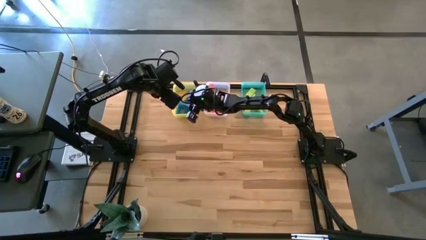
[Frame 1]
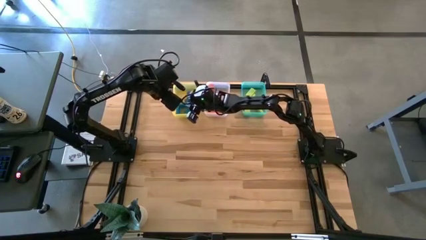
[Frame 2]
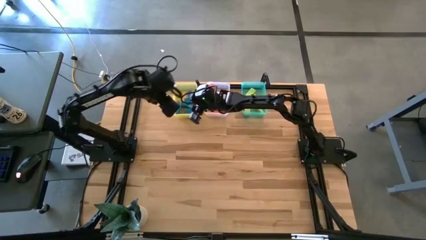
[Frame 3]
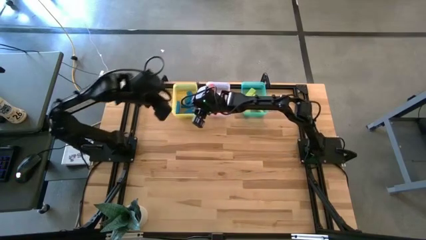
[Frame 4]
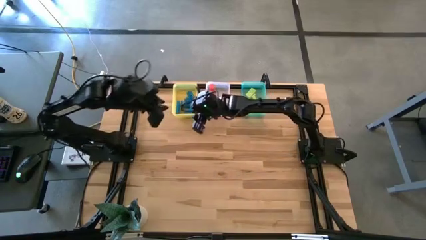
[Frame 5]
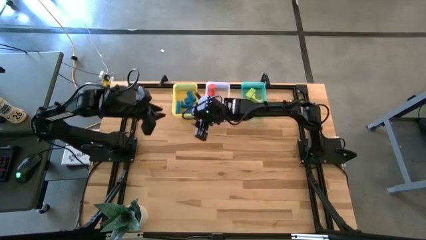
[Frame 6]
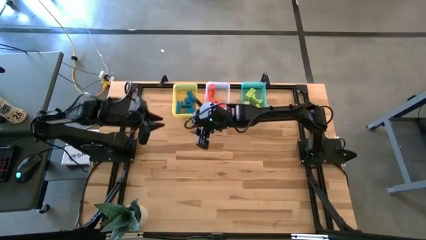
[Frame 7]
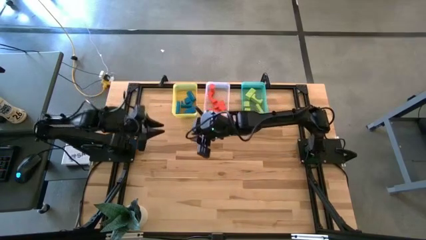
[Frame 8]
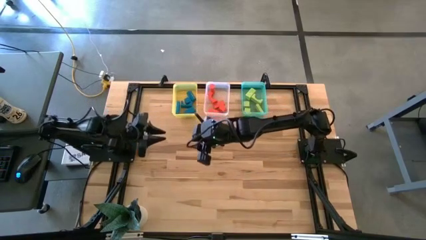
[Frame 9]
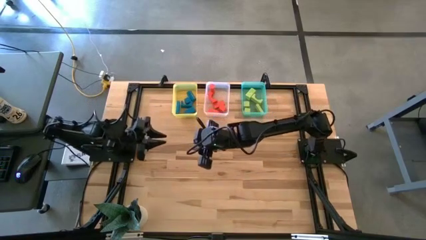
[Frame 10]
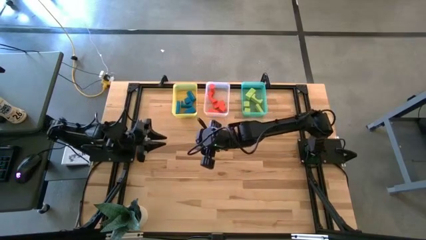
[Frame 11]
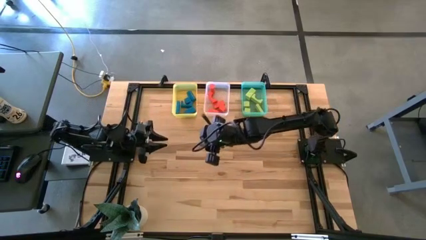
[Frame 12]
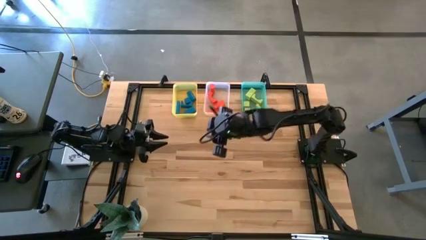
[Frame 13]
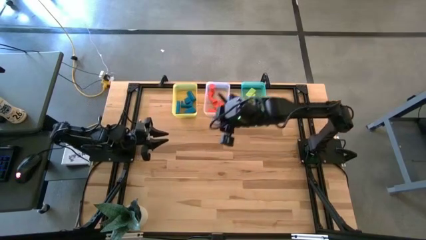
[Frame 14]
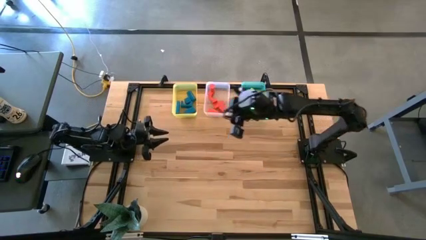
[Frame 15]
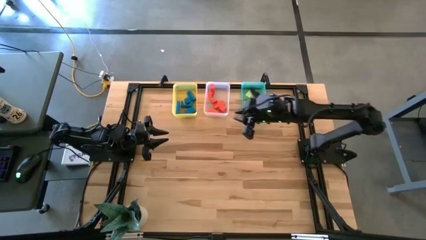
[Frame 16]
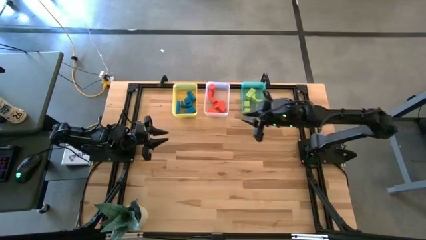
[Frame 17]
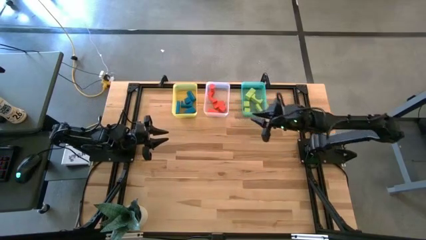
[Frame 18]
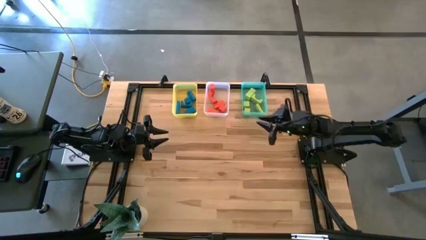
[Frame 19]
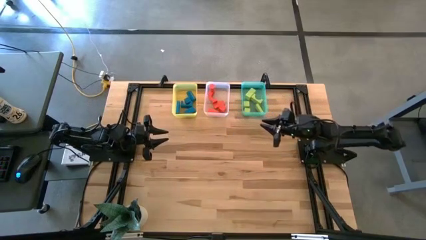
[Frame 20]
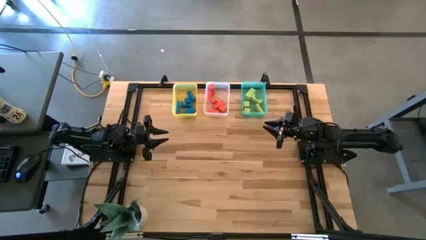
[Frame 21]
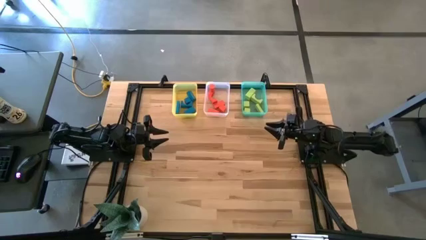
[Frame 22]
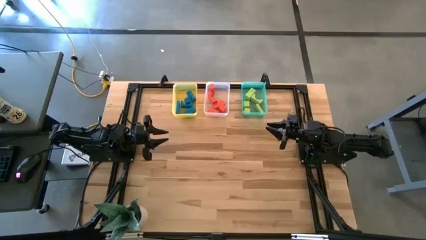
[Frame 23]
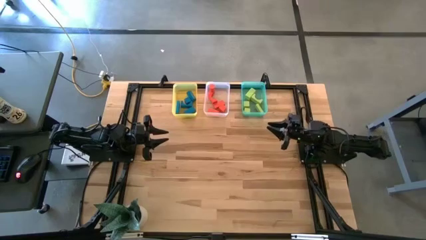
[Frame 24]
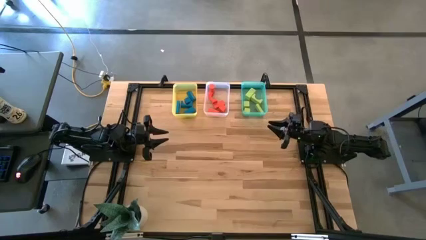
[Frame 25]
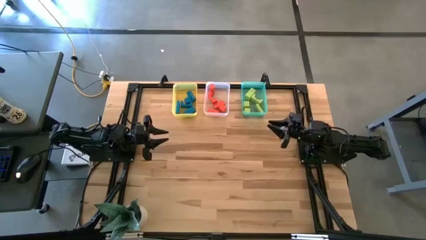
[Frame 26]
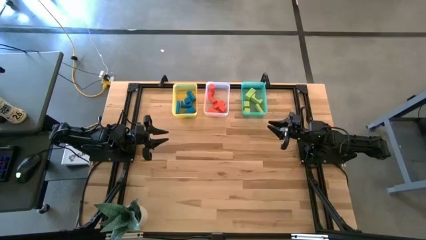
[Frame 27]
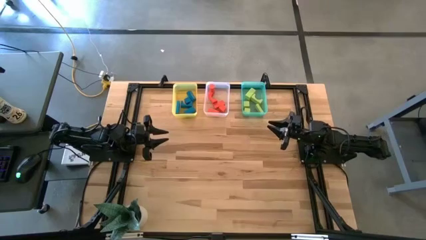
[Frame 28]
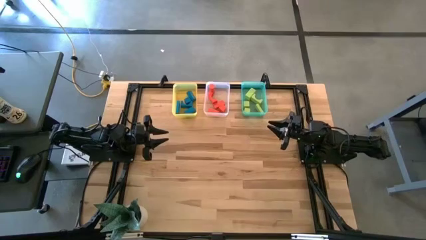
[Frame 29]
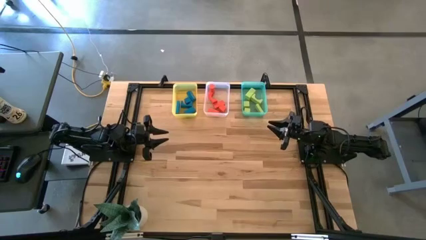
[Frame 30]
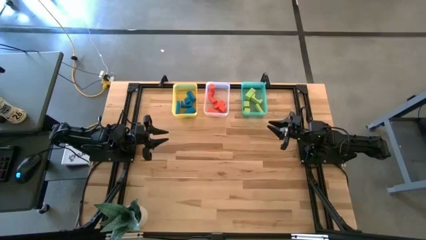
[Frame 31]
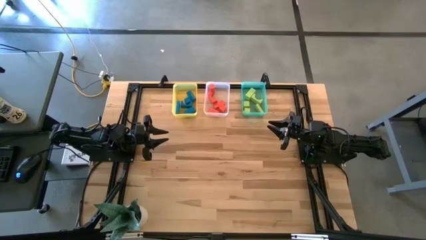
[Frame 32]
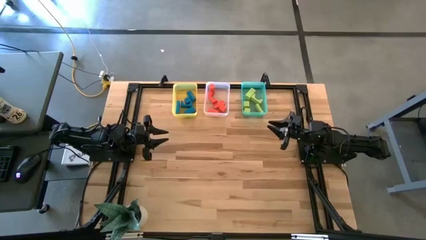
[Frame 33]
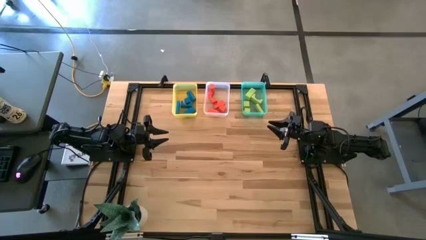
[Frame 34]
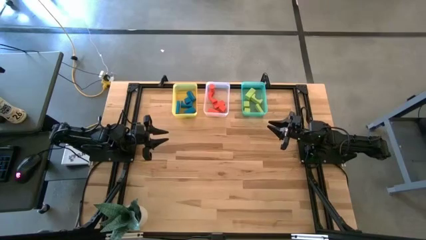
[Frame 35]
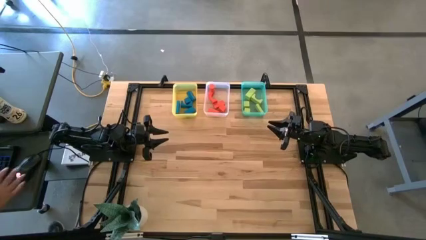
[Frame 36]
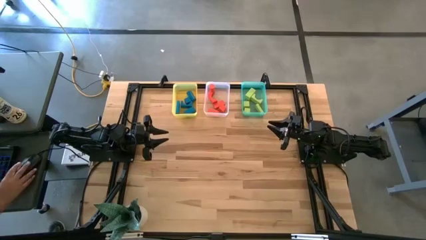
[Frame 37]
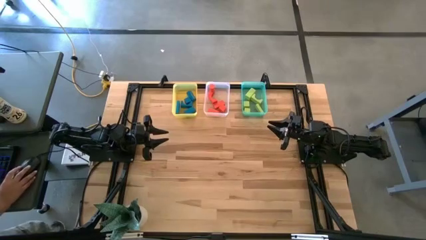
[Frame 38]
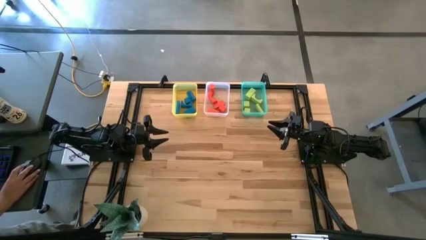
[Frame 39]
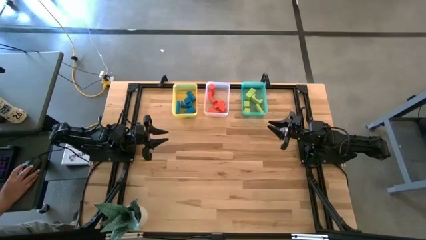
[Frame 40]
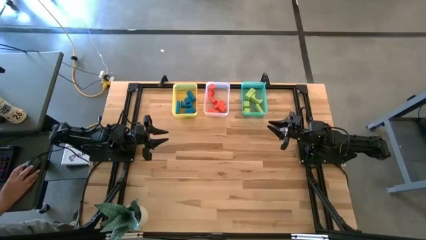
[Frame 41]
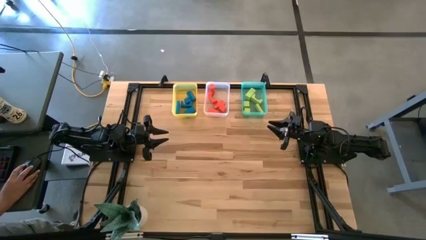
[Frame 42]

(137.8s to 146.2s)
Task: Sort & place blocks by color
Return to Home Position

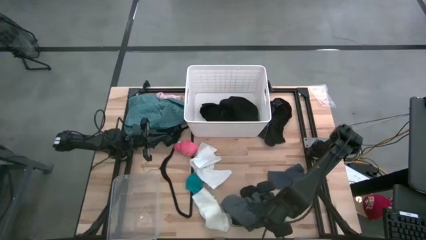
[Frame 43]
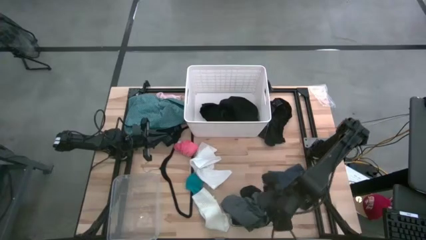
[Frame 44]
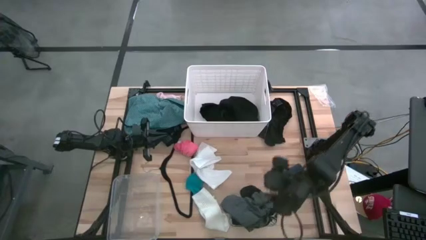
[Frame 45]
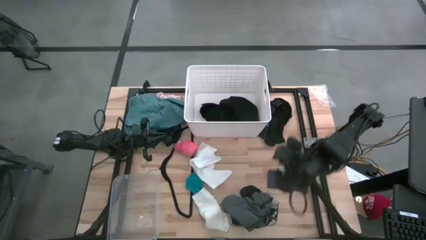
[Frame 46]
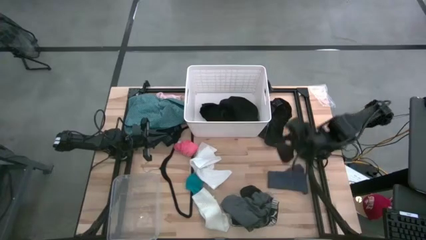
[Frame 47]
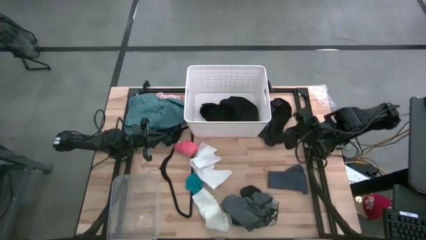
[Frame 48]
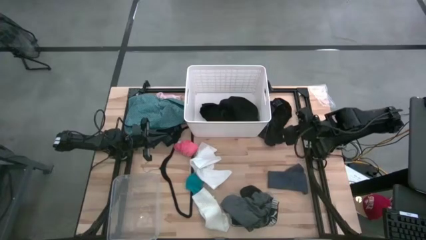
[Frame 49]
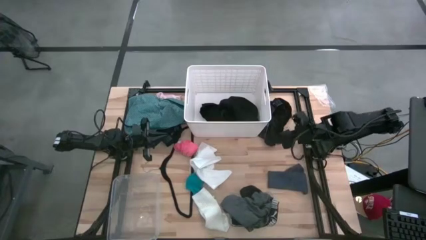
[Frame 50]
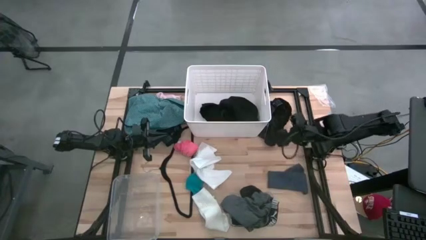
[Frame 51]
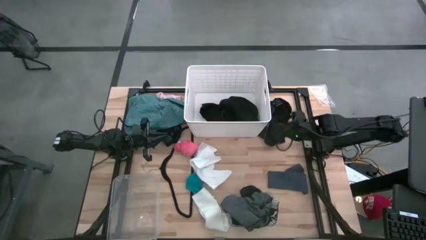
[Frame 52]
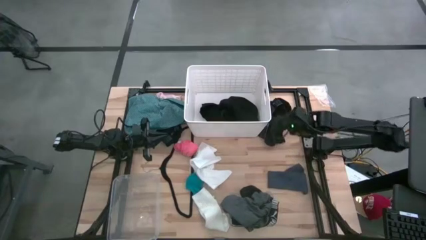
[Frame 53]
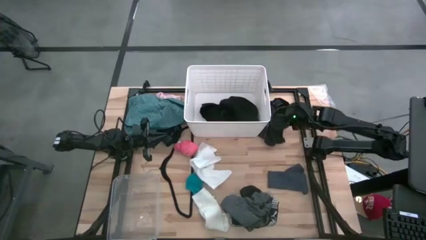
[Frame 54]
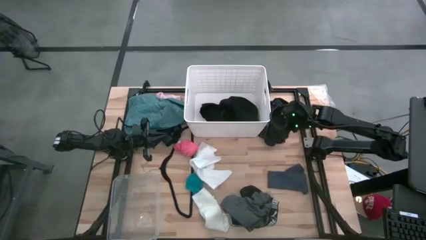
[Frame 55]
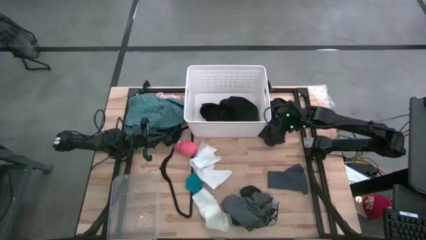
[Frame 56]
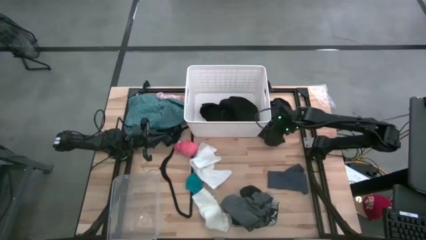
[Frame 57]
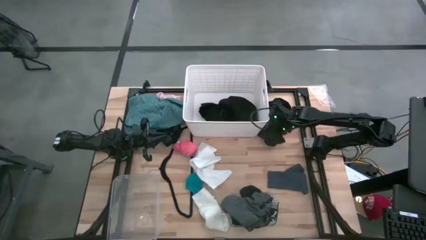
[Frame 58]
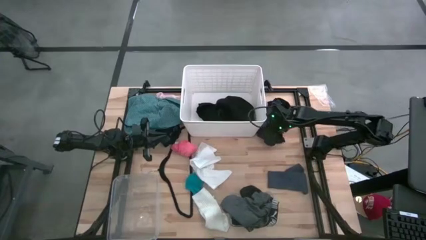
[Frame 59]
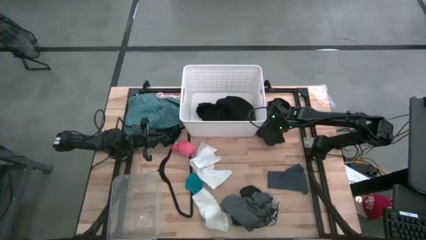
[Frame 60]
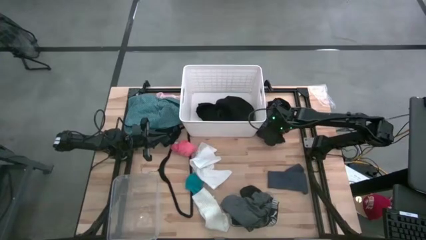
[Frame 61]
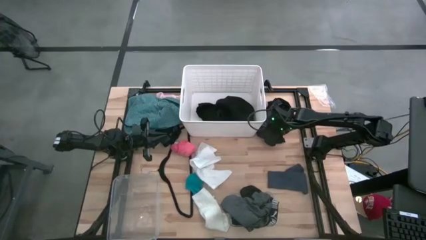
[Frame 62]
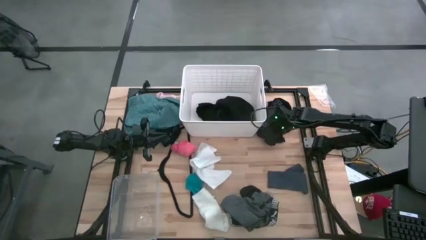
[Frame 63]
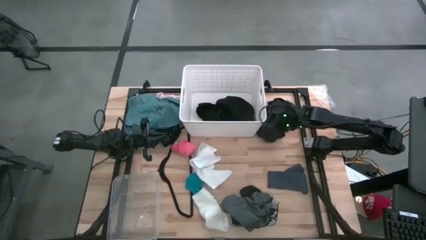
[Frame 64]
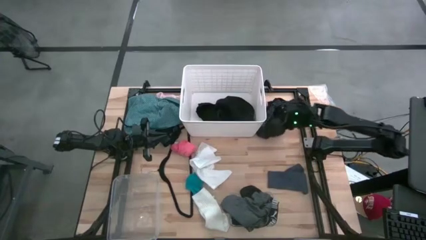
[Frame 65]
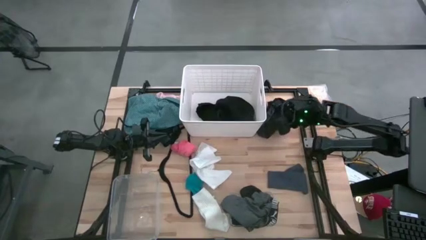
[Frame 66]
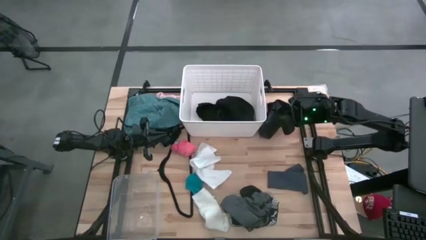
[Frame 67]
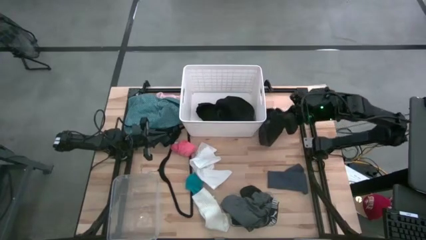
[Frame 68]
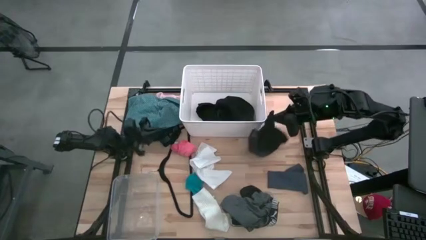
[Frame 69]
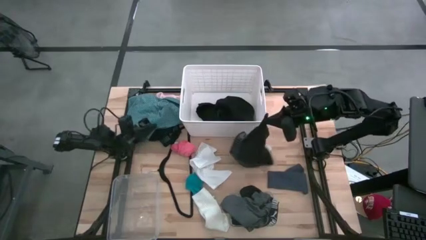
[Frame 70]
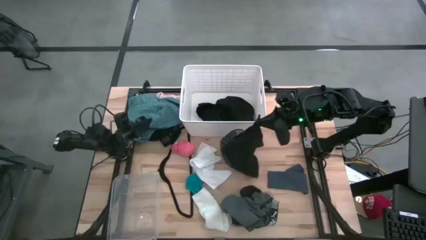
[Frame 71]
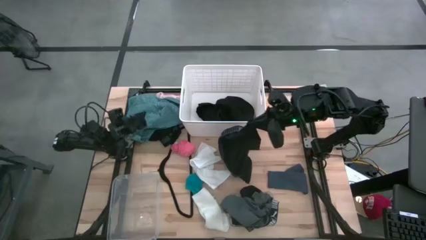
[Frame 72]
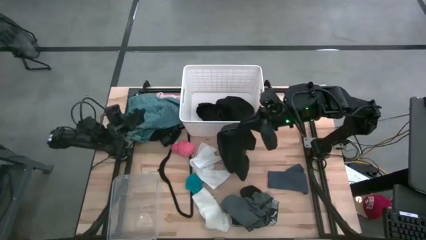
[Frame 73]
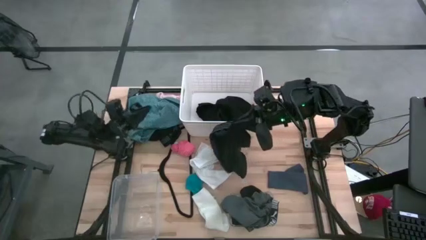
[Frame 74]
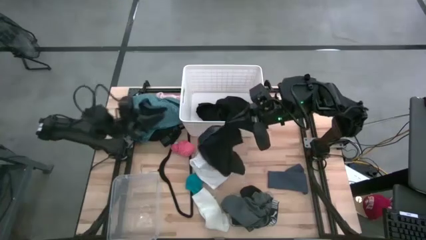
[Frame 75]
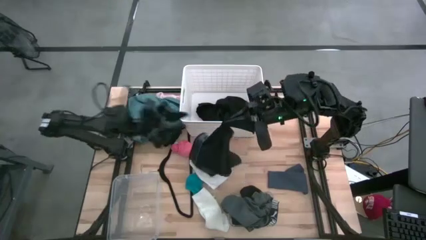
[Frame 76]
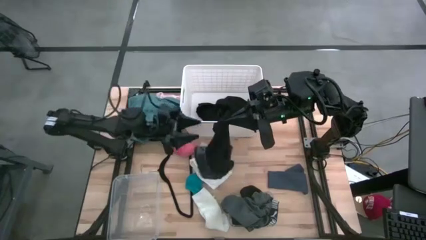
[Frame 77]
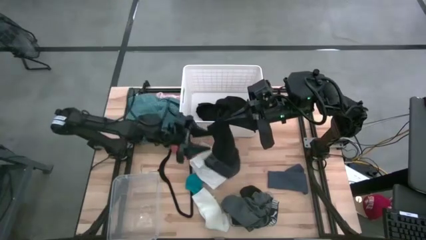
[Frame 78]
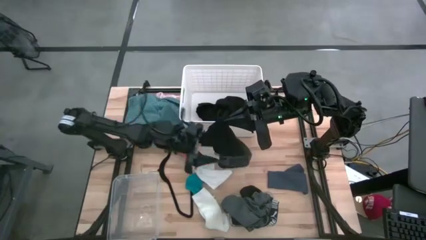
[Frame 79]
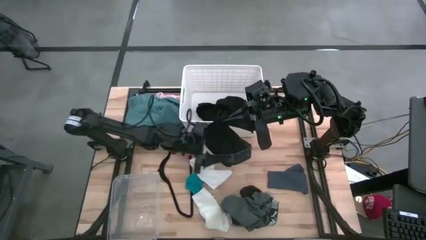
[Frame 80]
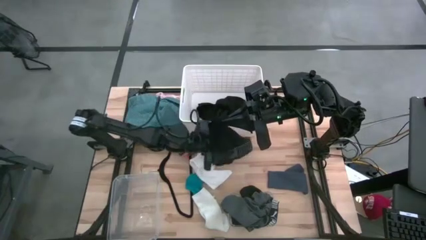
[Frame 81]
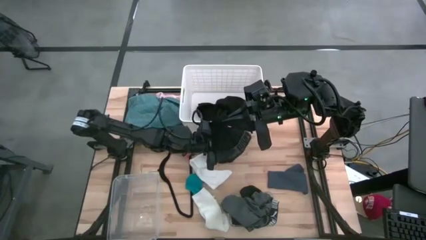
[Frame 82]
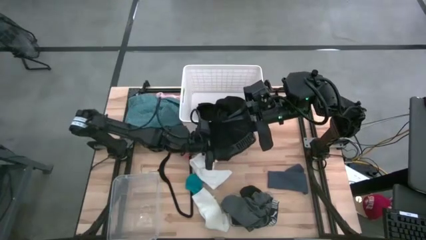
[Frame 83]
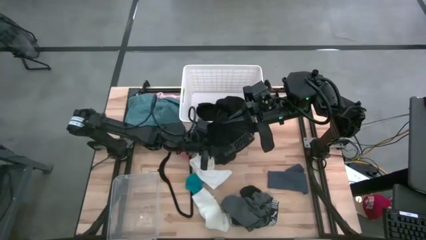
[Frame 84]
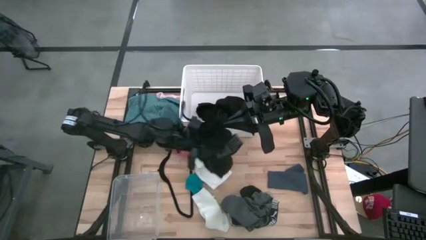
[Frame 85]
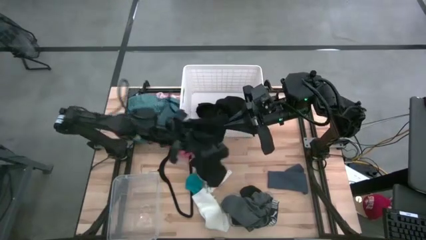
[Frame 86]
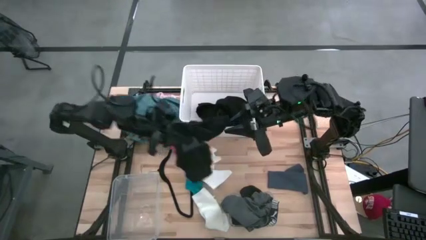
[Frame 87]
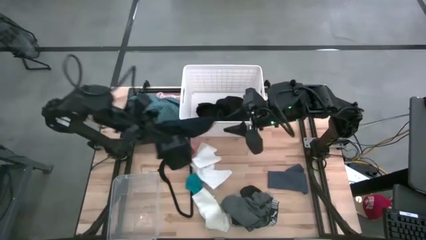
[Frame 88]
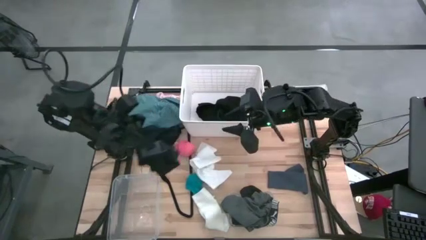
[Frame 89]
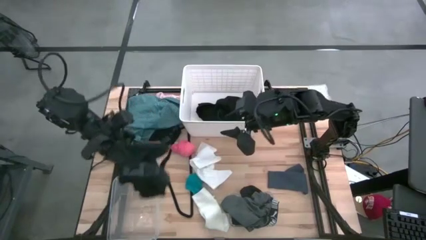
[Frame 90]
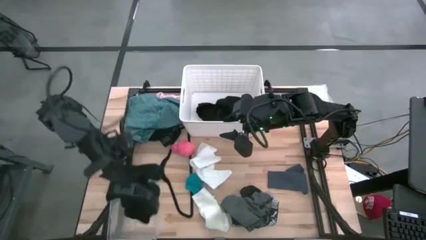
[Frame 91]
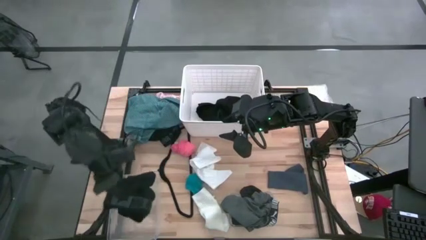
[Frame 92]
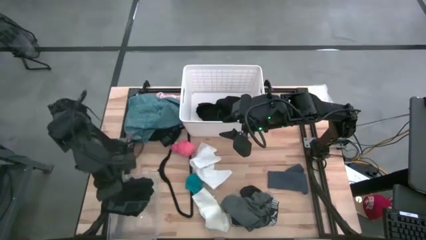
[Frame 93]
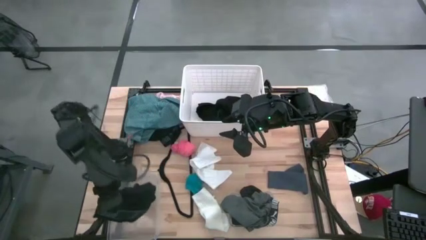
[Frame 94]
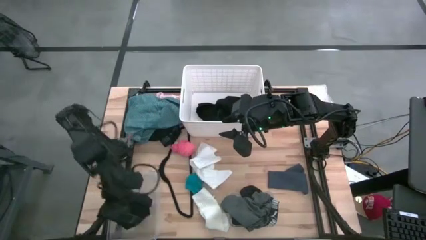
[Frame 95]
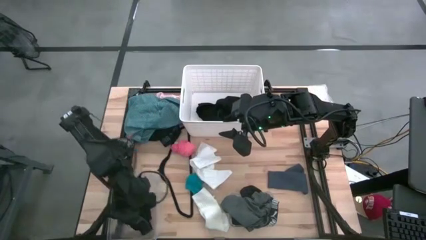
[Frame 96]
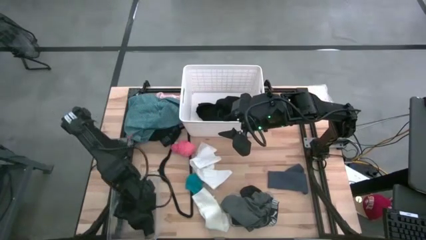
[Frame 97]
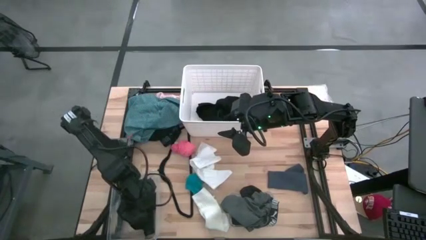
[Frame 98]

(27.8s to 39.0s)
Task: Pick & Place Cloths
Put the black boxer into the left transparent bin
